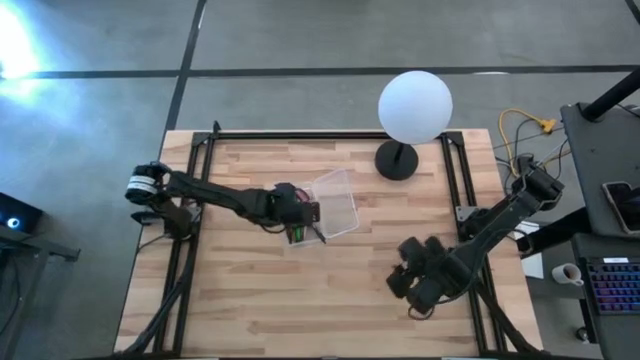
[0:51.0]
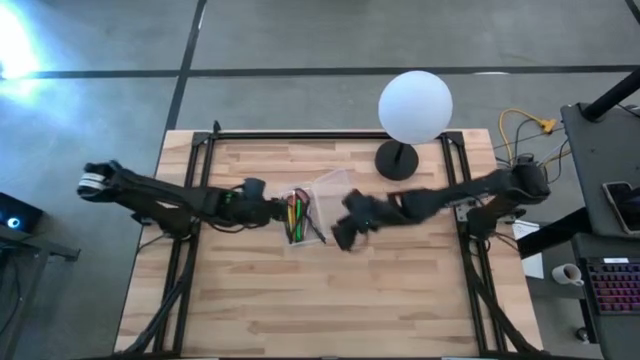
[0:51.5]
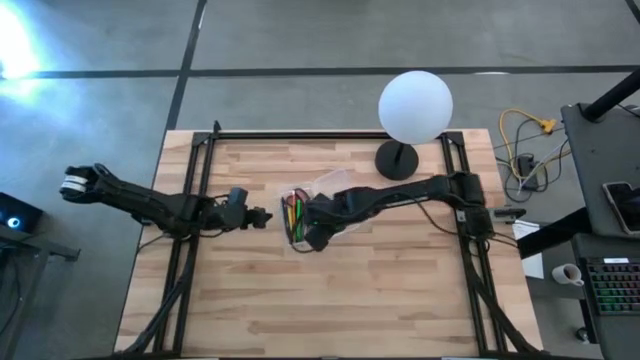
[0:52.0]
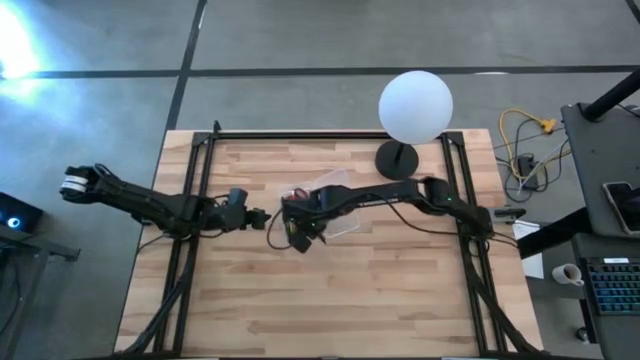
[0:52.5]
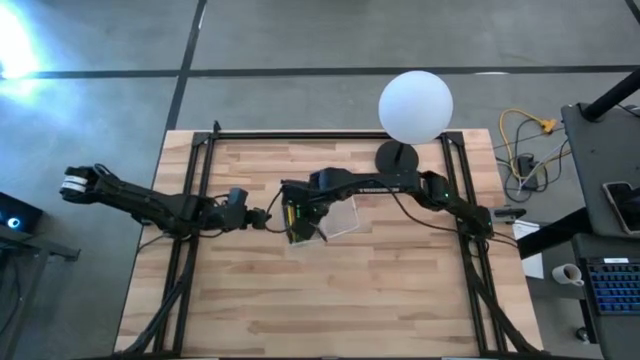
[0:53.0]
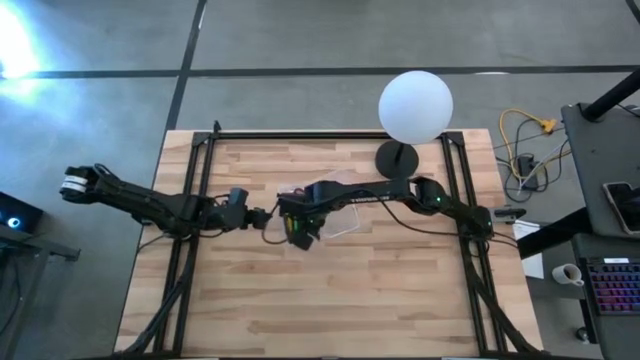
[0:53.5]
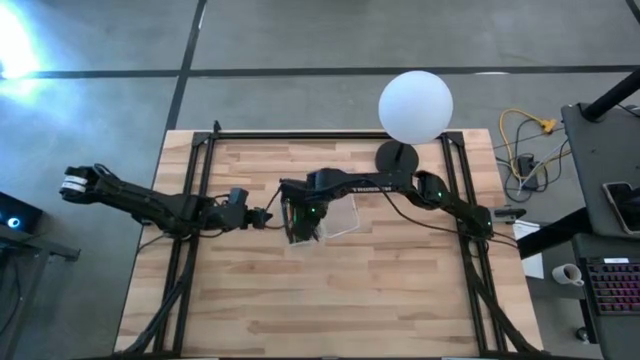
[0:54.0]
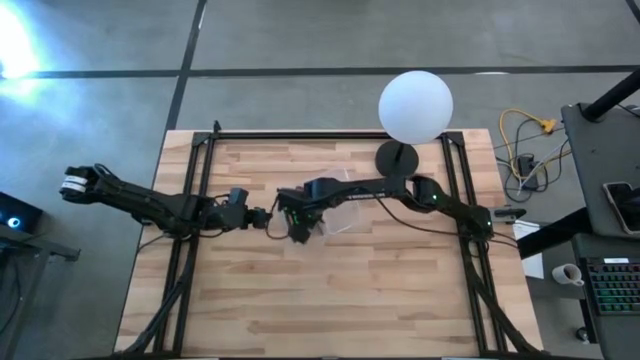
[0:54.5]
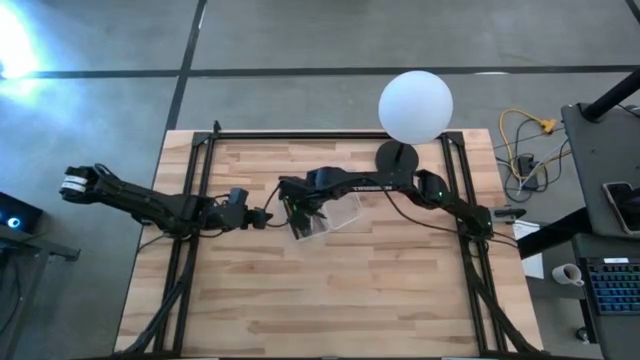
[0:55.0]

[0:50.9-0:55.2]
Task: Pick & place school supplies into a supply box
Adjust the black pen on the transparent supply box

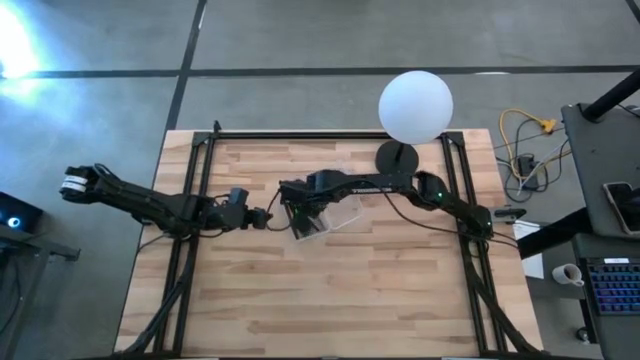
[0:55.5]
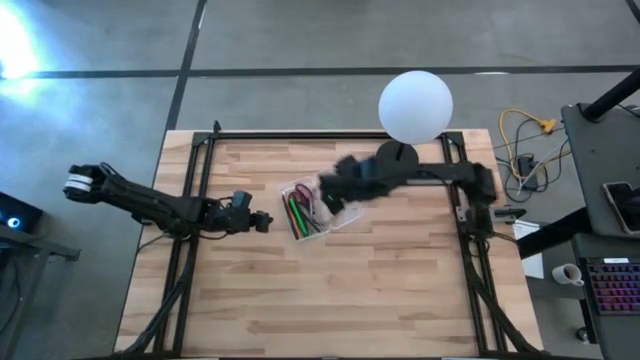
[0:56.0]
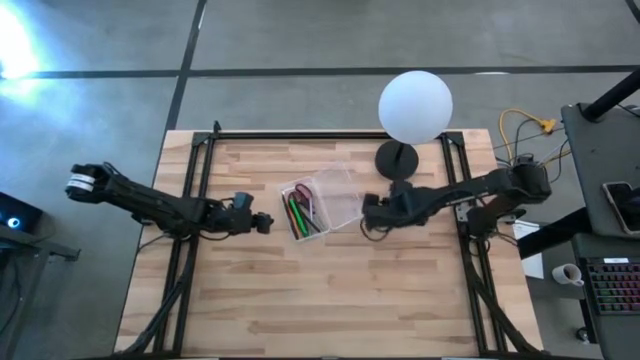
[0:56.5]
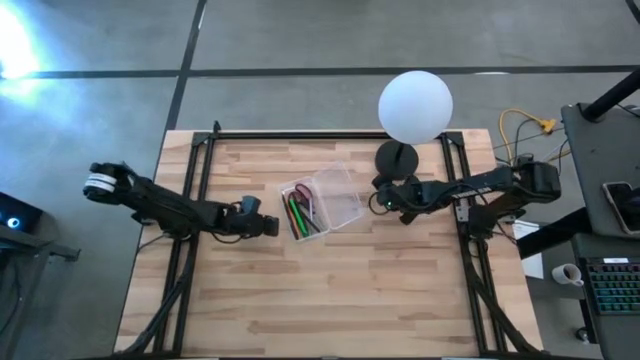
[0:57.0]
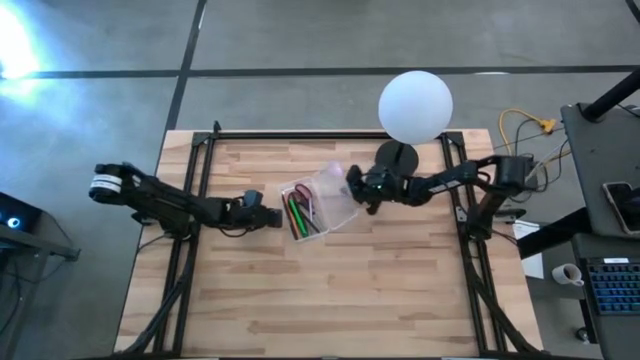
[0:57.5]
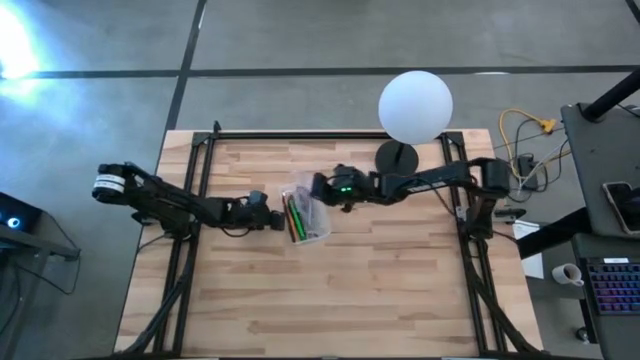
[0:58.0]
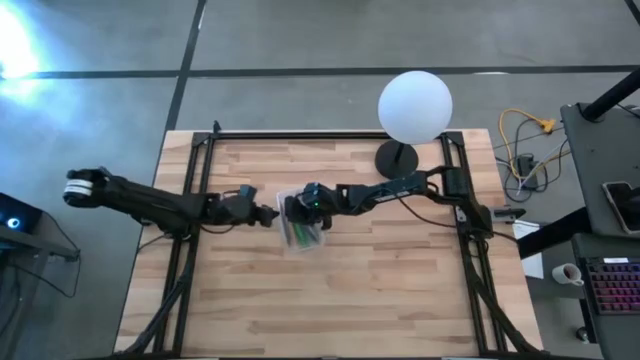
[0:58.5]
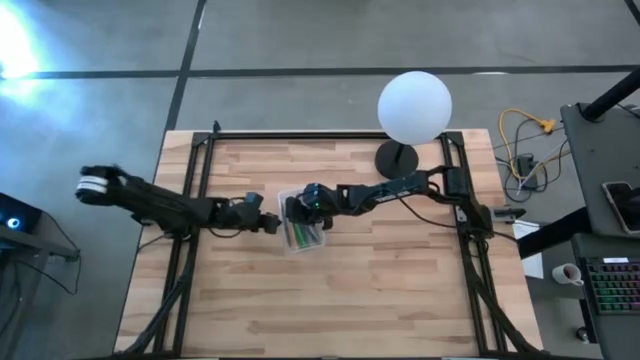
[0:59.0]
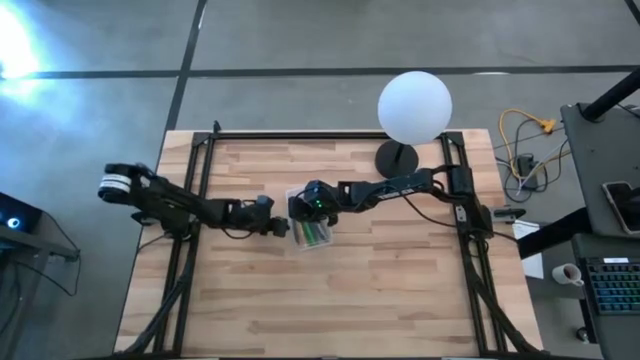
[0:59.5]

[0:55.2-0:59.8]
Close the transparent supply box

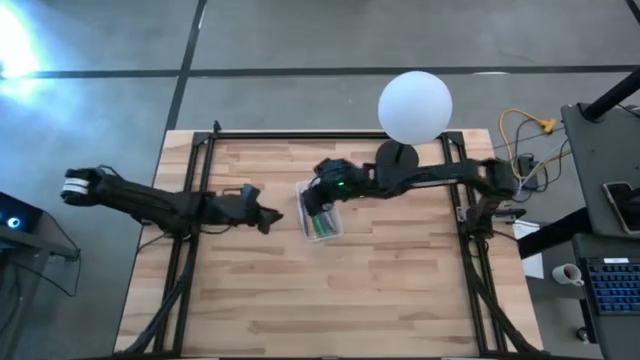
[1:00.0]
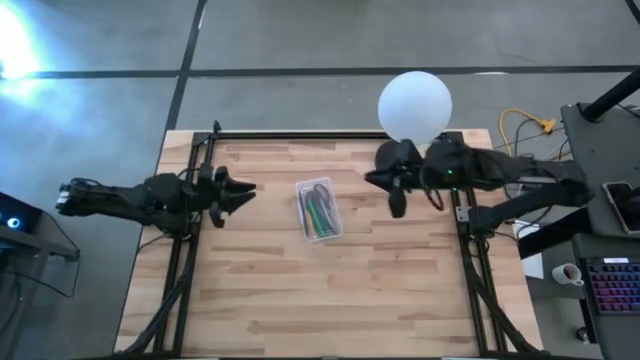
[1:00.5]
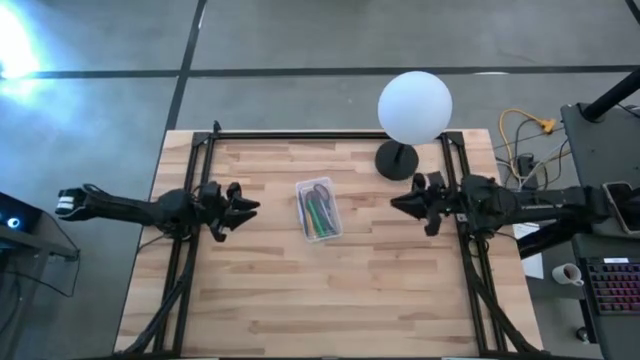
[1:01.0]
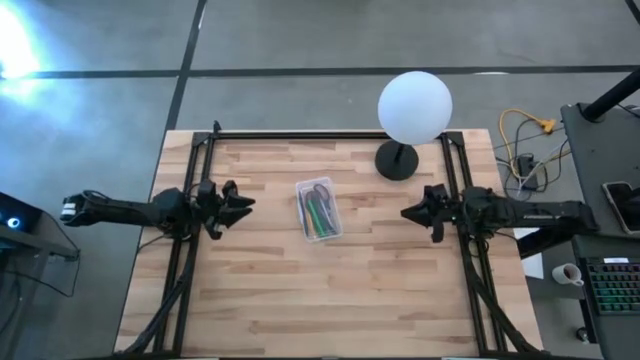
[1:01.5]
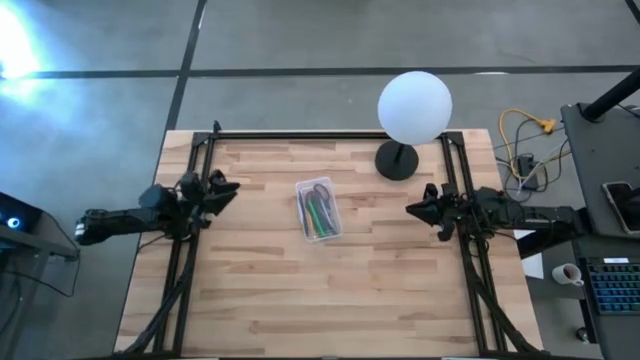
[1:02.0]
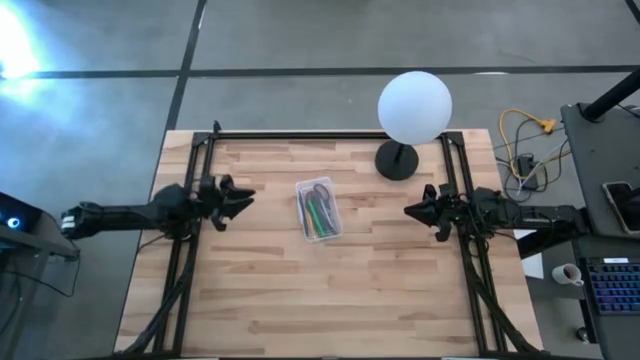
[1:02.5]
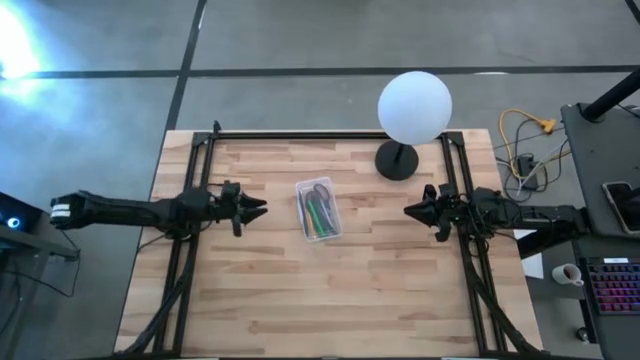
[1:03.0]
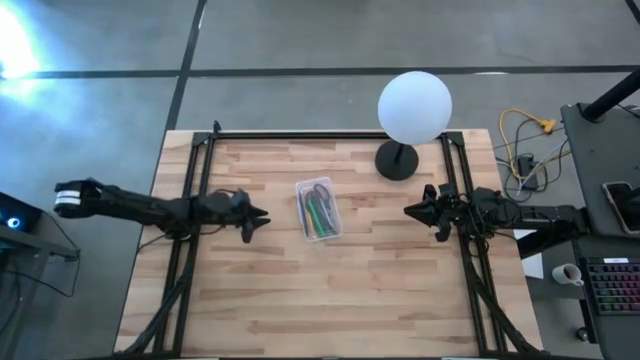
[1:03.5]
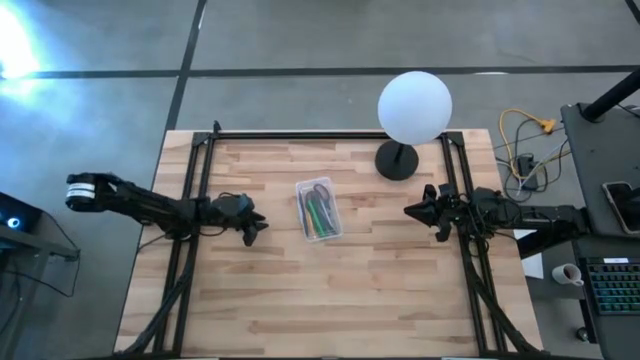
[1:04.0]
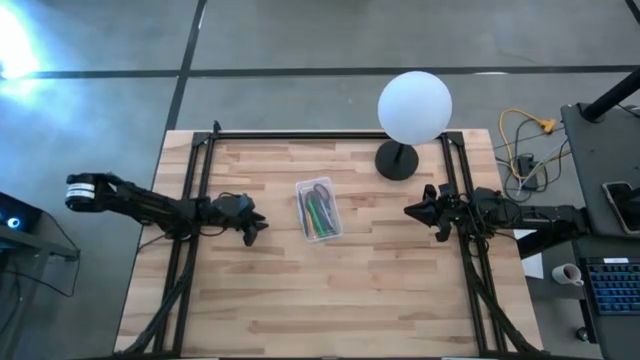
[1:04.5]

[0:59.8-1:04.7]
Return to Home Position

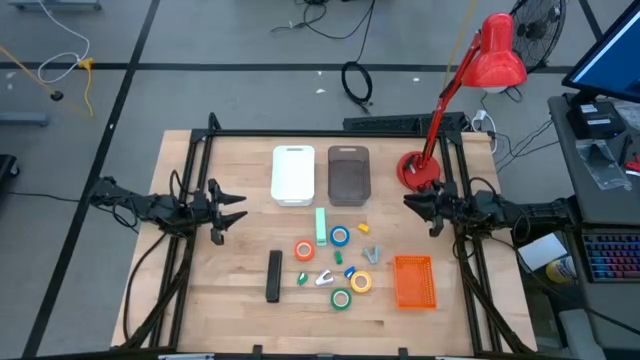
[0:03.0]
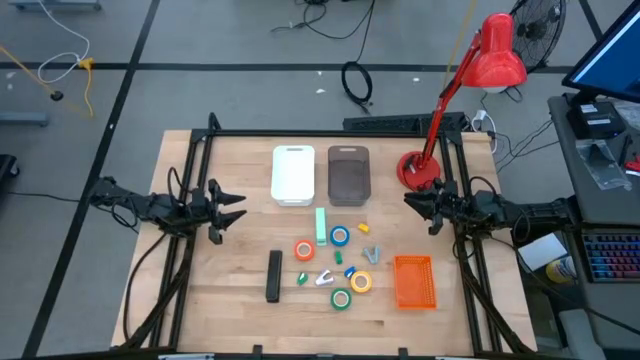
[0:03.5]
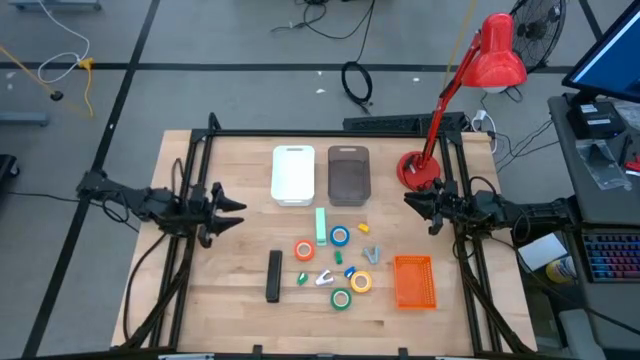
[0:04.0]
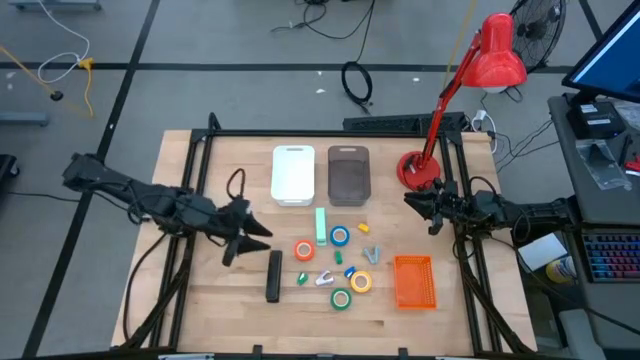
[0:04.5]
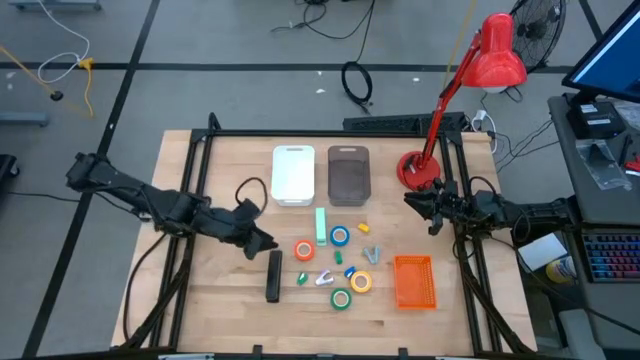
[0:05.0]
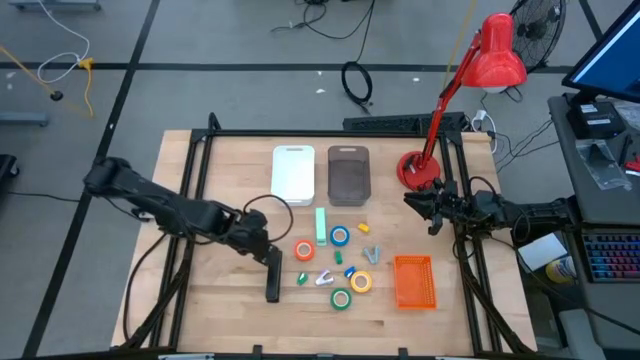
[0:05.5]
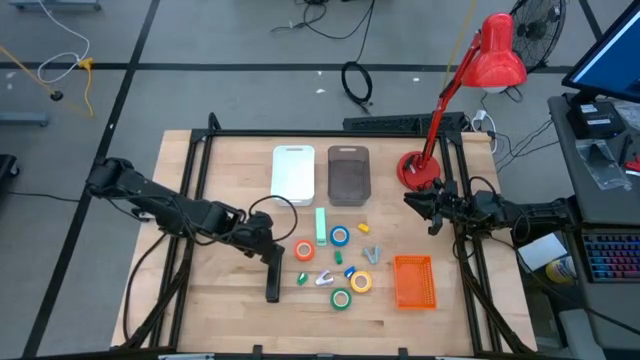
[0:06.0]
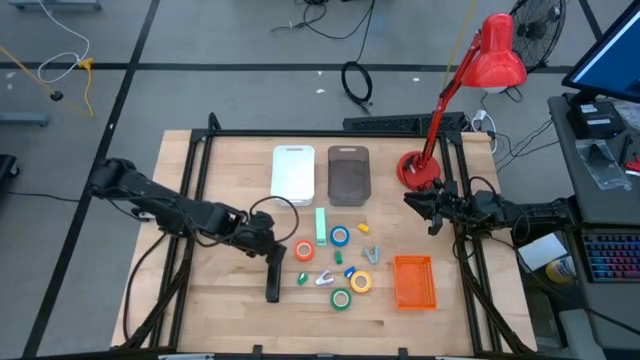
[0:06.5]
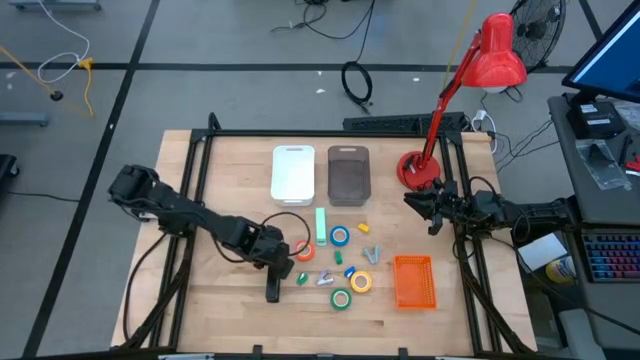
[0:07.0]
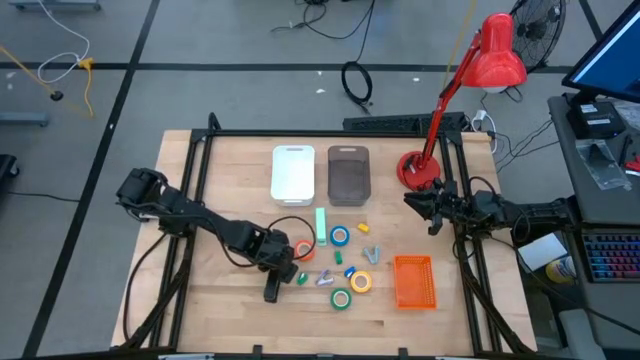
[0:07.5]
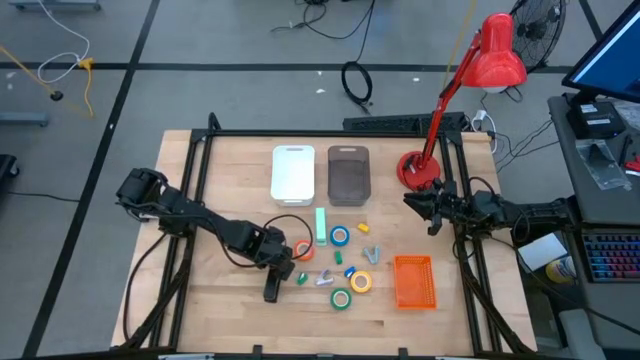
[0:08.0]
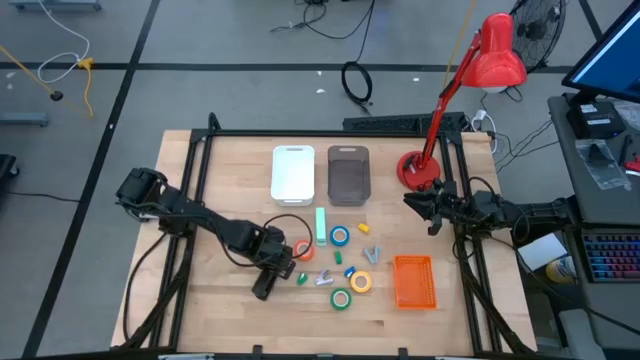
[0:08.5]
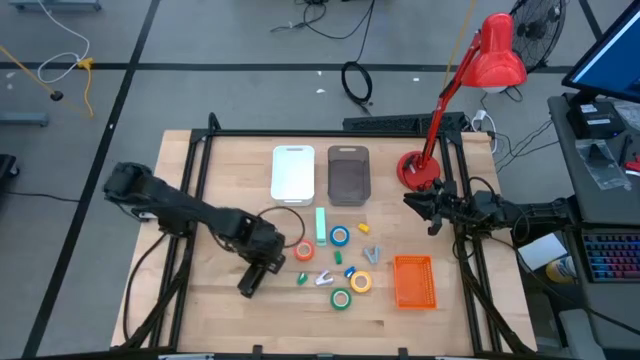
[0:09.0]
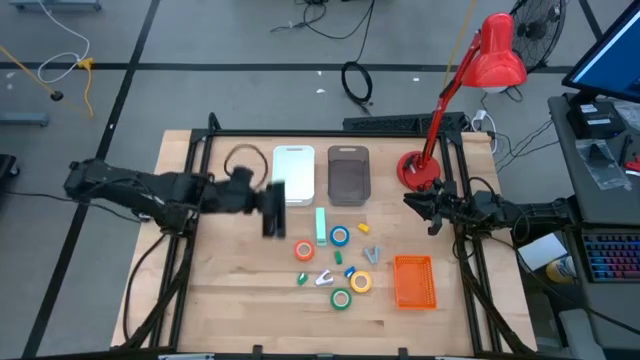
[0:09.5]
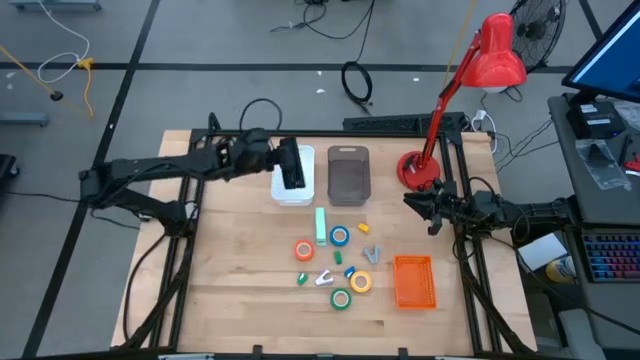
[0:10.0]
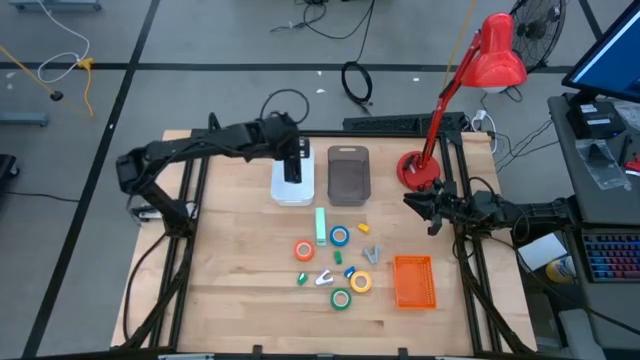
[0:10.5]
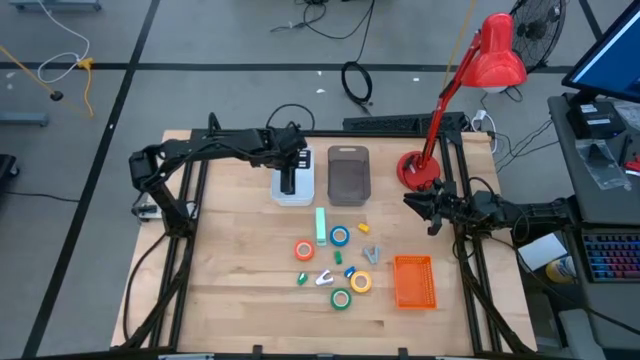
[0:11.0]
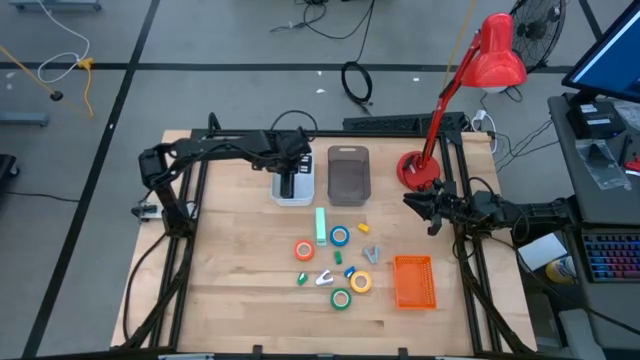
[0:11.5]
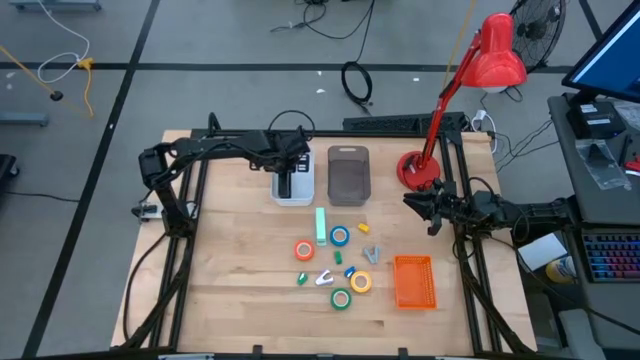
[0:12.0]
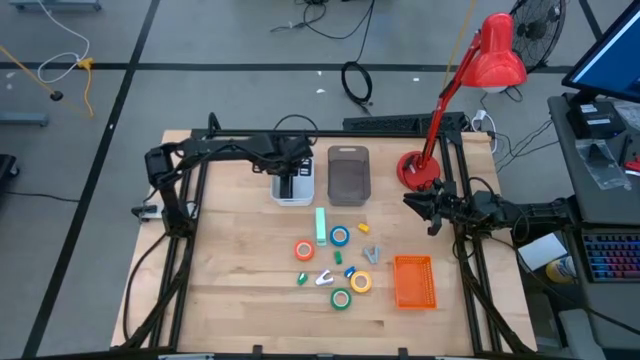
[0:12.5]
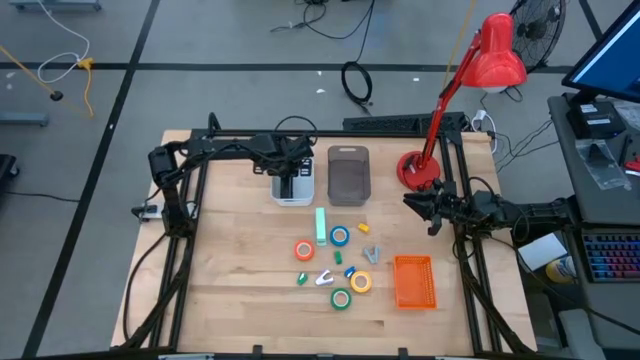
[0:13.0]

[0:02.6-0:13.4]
Task: Pick and place Stapler, Stapler remover, tape
Put the black stapler into the white bin
